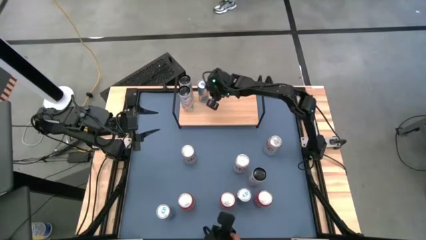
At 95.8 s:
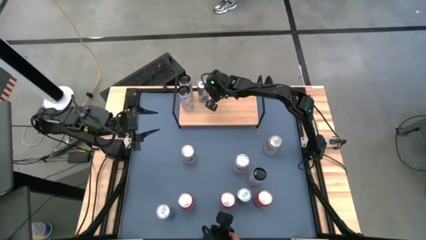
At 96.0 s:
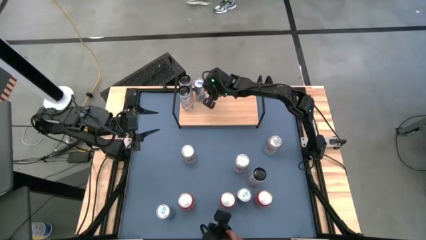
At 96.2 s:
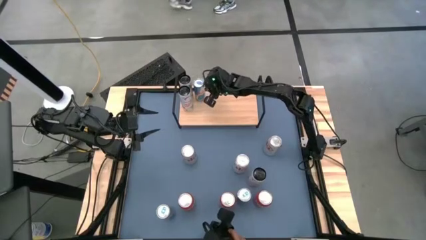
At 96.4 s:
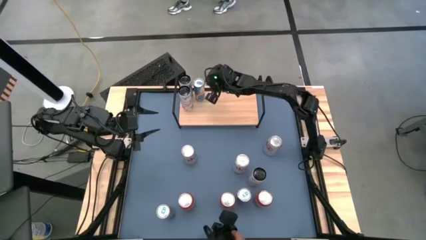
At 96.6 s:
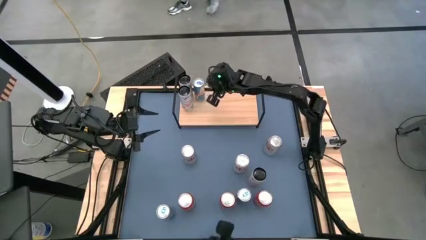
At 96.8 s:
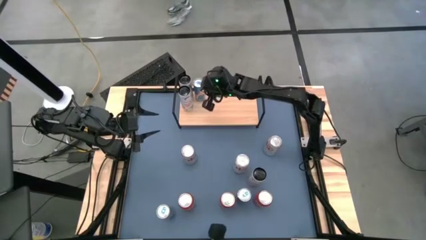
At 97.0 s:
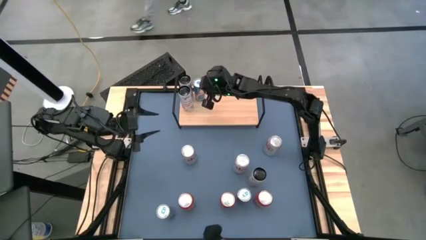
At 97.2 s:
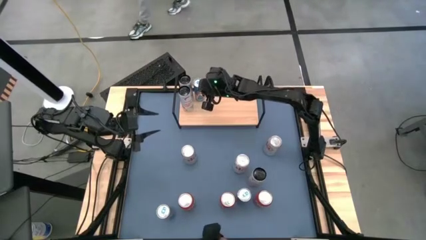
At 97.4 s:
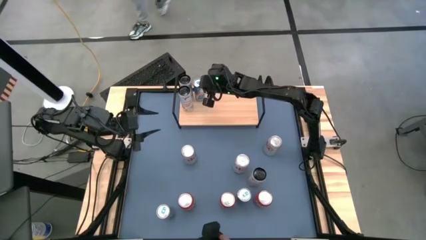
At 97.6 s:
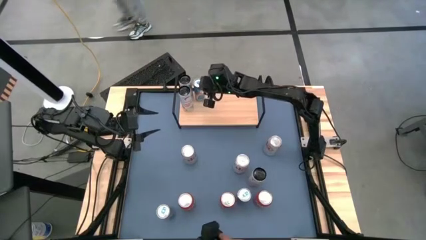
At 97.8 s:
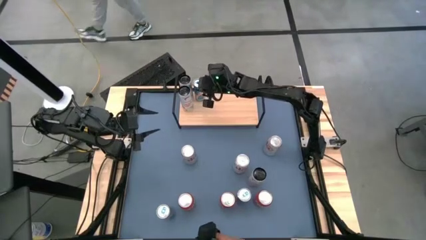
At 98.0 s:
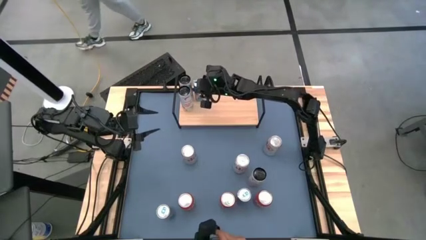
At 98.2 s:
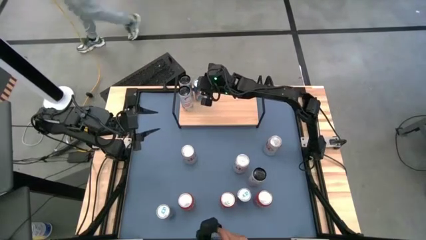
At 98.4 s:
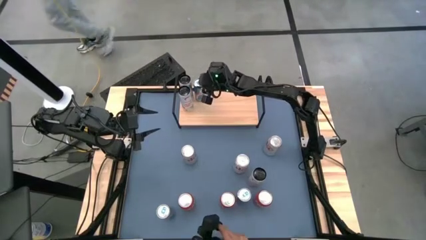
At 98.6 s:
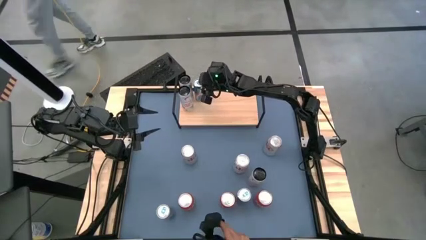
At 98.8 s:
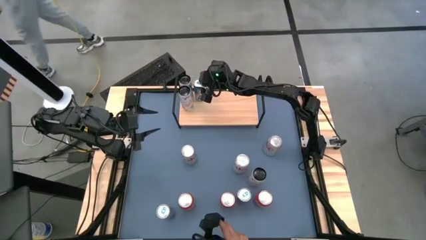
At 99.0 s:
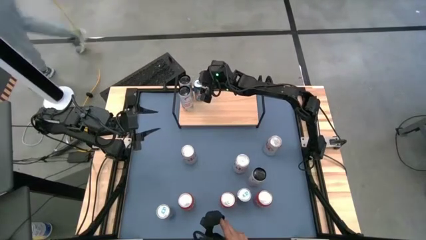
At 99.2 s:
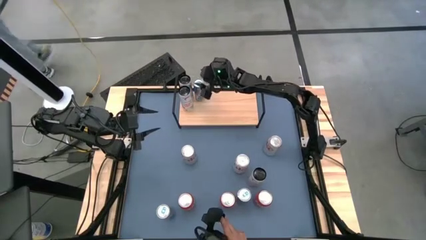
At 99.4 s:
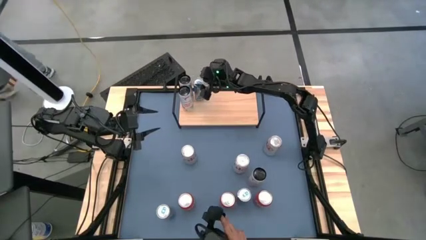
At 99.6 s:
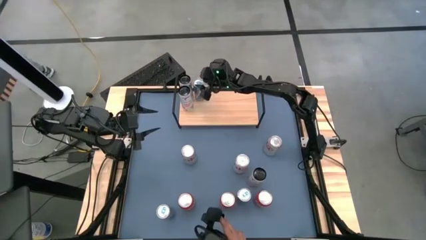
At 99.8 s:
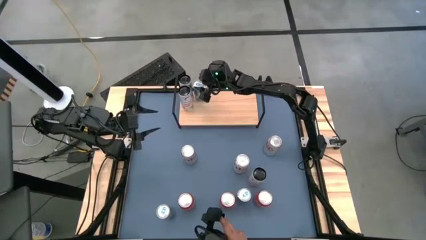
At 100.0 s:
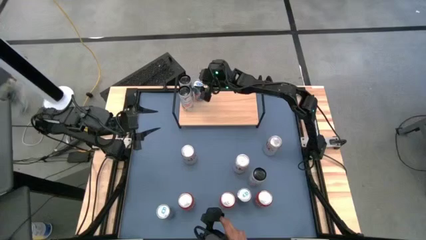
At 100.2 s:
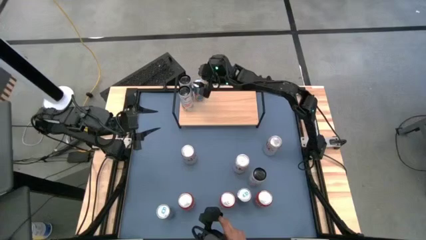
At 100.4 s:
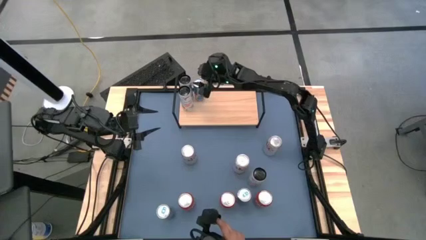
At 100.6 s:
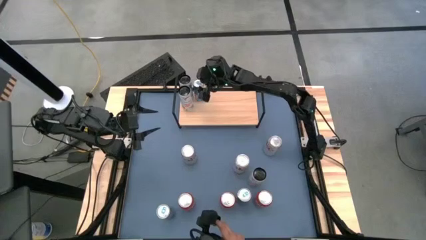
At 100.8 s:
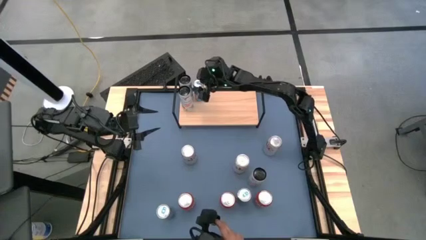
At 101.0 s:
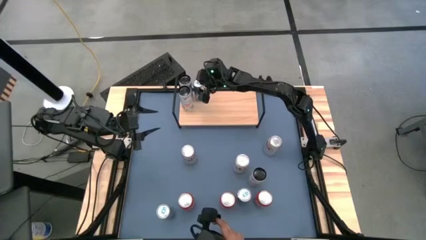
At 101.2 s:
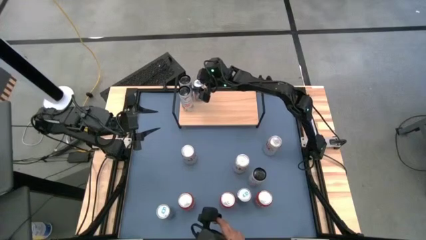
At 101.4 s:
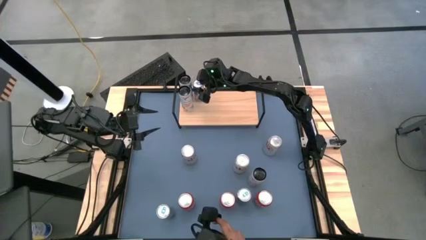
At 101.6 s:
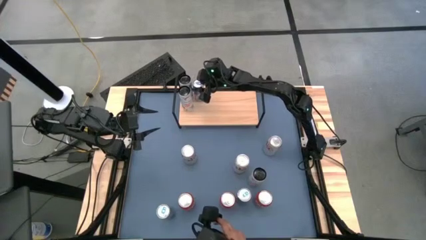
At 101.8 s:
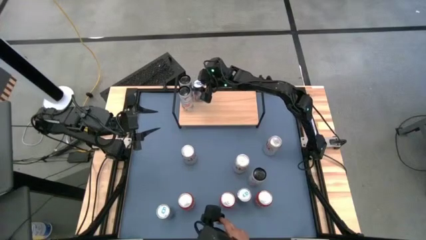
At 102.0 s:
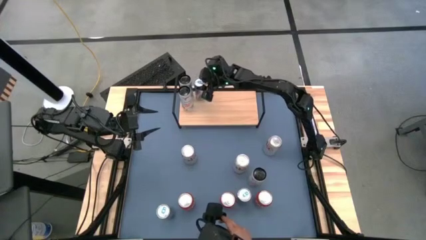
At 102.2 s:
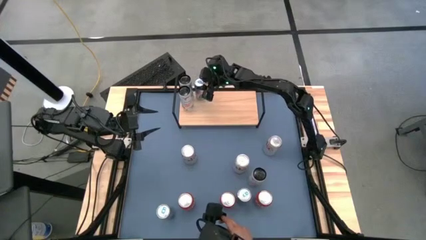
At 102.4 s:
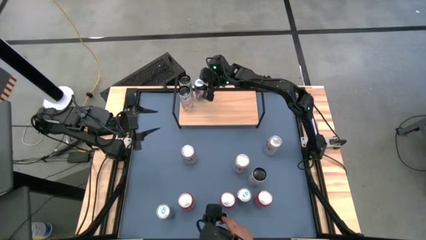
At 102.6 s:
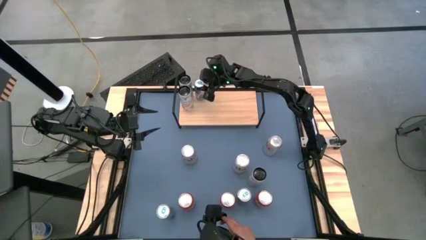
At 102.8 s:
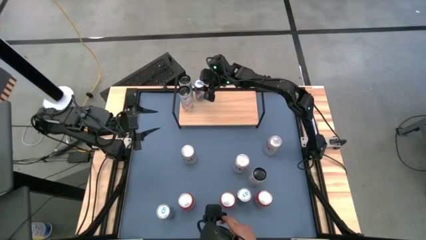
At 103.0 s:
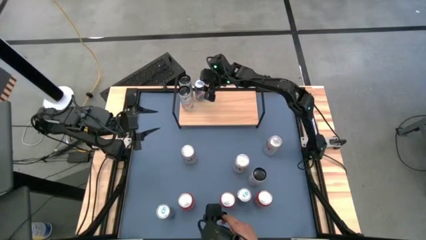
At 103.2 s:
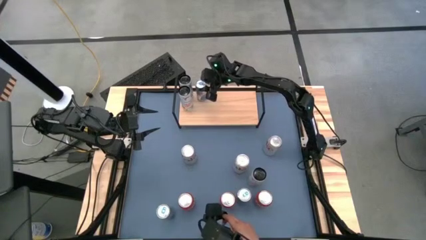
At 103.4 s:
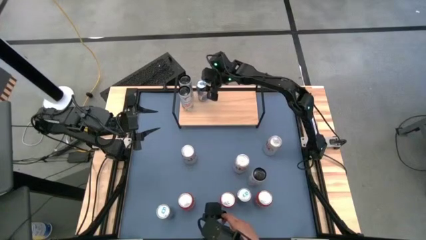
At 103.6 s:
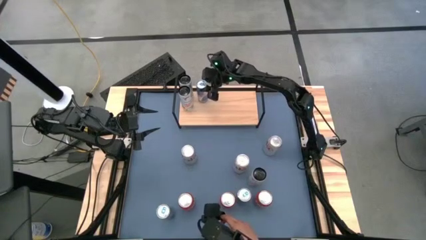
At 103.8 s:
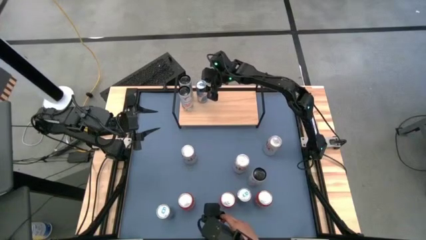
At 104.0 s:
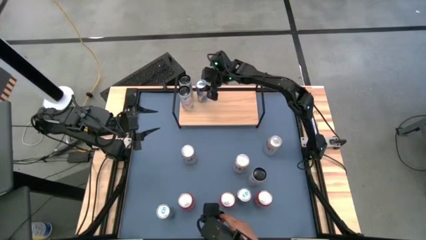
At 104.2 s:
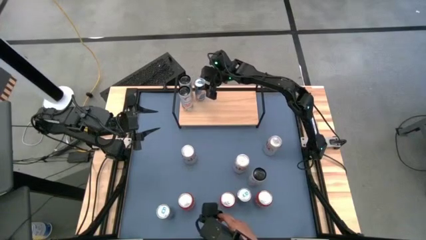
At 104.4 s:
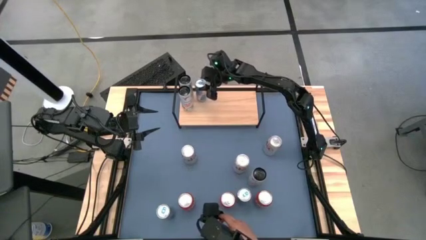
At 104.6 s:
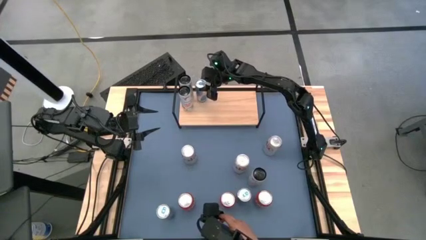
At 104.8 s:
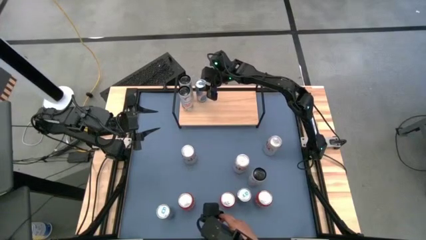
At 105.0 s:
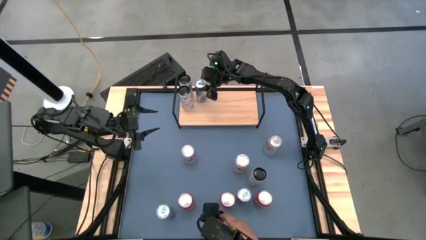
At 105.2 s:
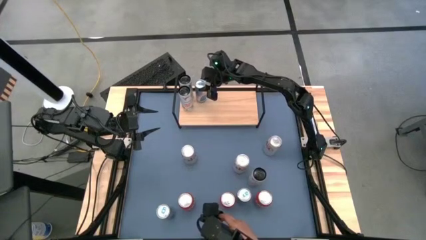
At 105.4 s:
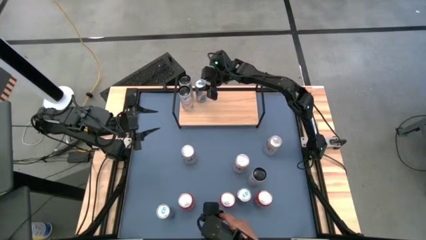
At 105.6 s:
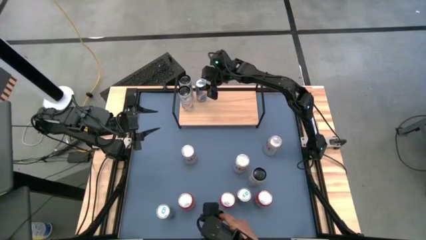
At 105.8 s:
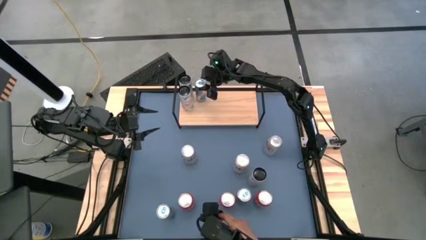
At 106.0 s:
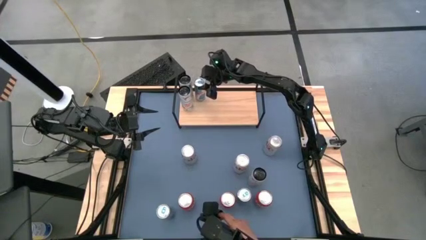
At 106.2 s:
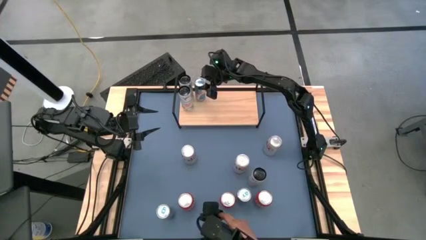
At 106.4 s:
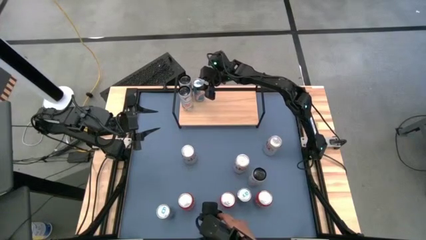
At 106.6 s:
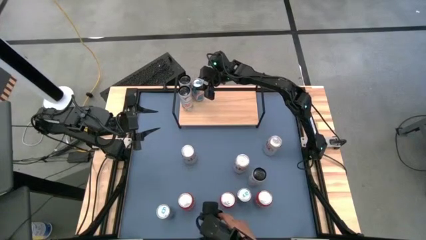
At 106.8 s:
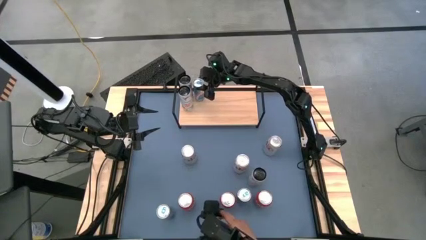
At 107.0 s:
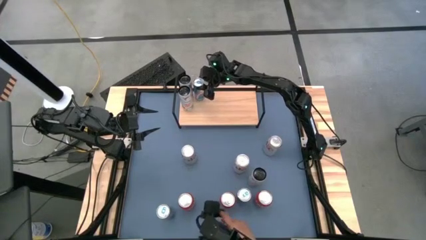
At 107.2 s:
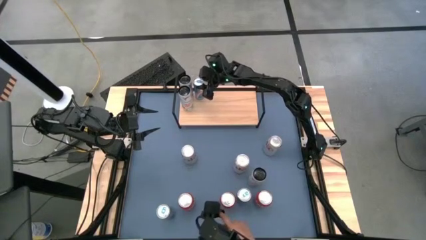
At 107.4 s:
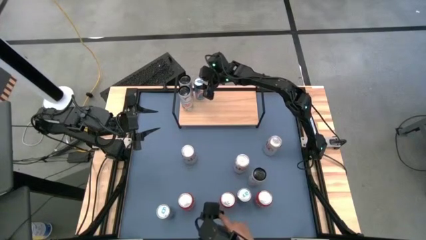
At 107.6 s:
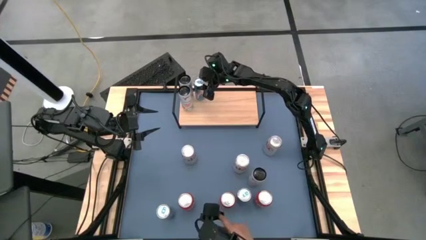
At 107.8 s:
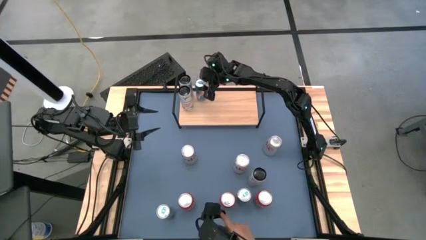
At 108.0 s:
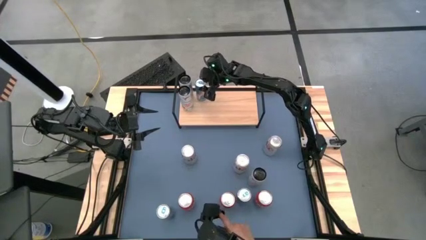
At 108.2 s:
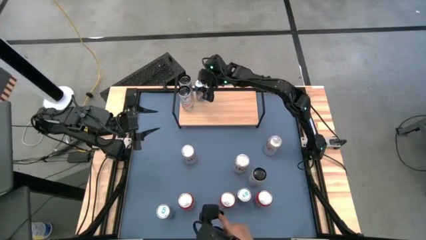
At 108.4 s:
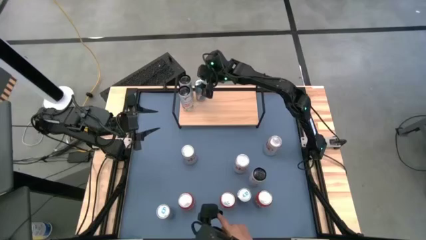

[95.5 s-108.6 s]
Task: Place canned beverage on shelf
Put the top blue soda can on the shelf

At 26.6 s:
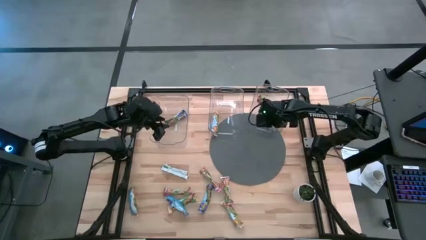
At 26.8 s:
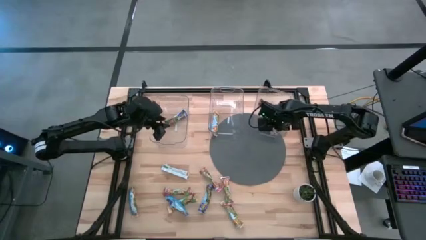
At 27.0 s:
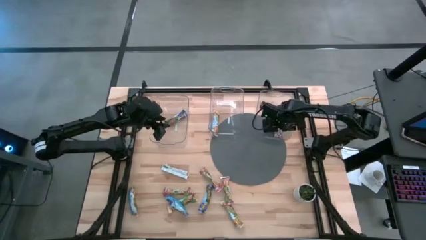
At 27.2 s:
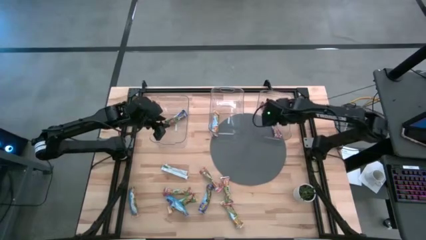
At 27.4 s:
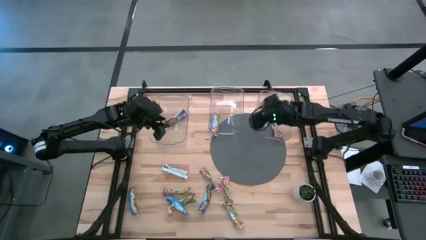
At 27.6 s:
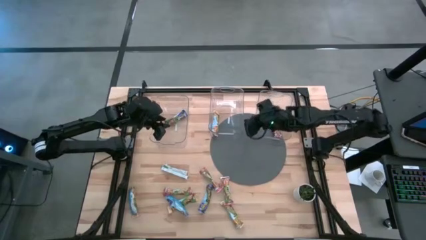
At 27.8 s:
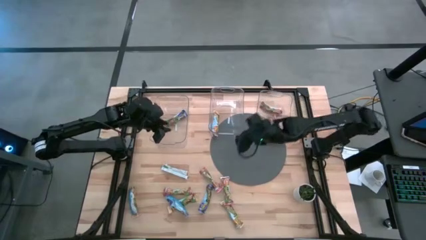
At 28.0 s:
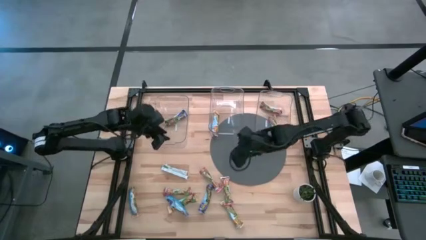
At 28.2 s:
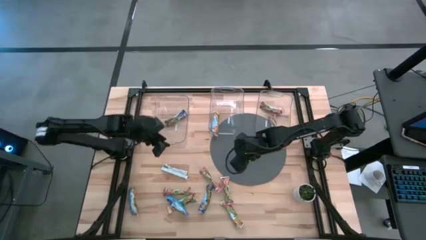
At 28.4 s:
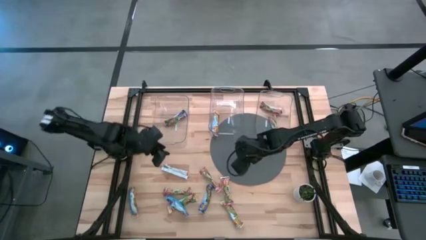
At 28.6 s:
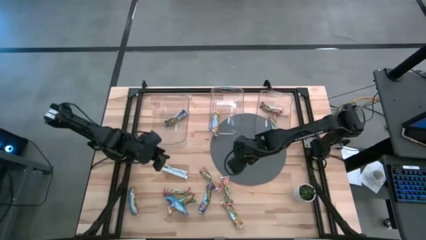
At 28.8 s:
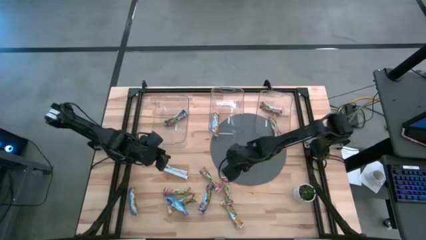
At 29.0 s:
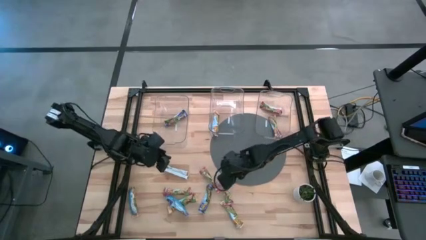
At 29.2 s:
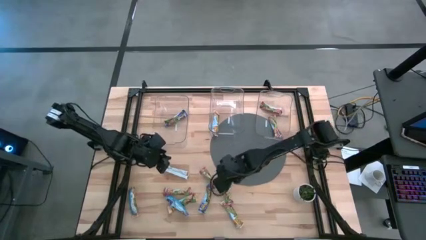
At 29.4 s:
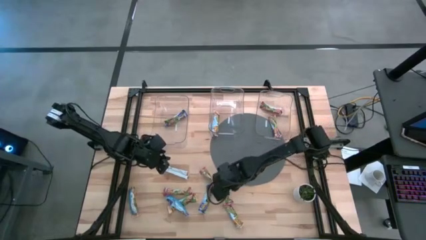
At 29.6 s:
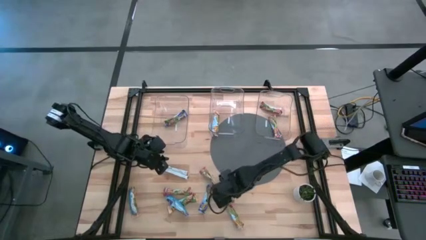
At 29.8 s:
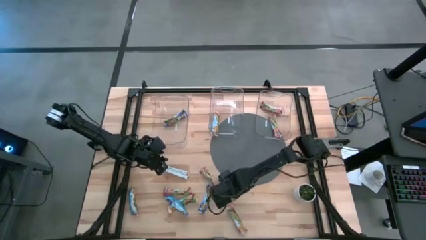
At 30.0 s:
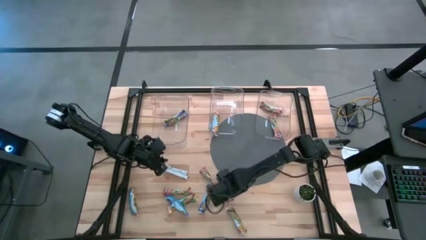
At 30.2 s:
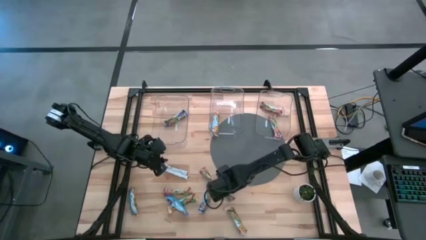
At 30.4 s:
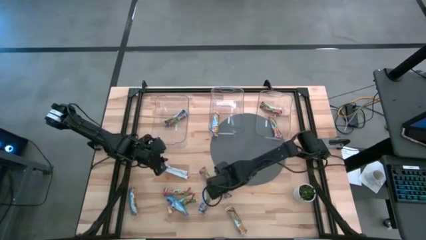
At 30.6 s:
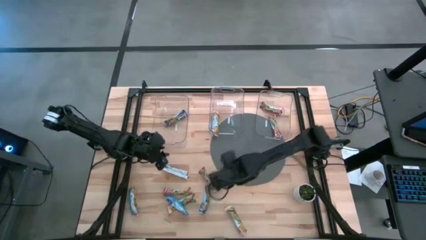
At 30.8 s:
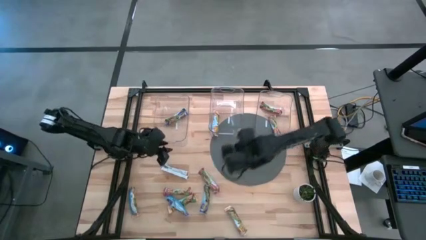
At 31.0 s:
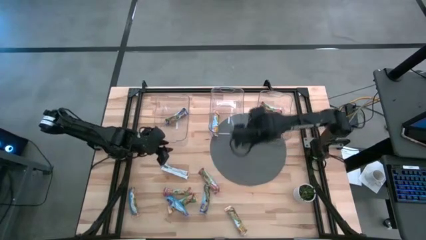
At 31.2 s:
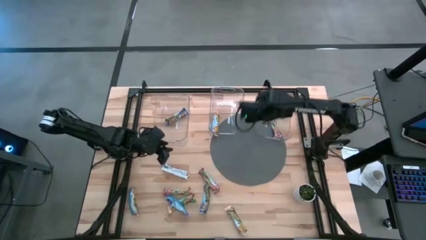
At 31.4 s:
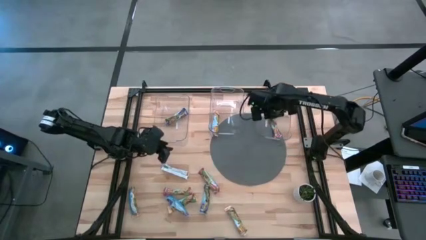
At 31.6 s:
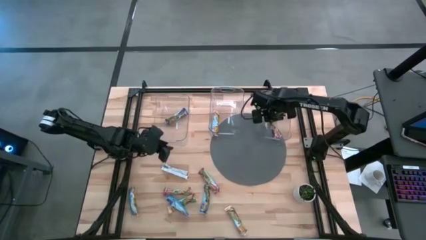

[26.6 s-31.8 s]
Task: Pick and place Granola Bars by type
Put the red granola bar into the right transparent bin
